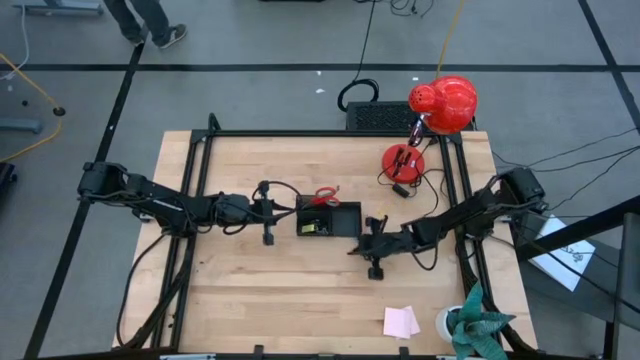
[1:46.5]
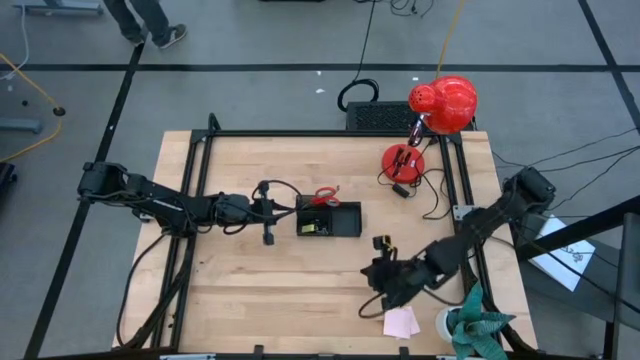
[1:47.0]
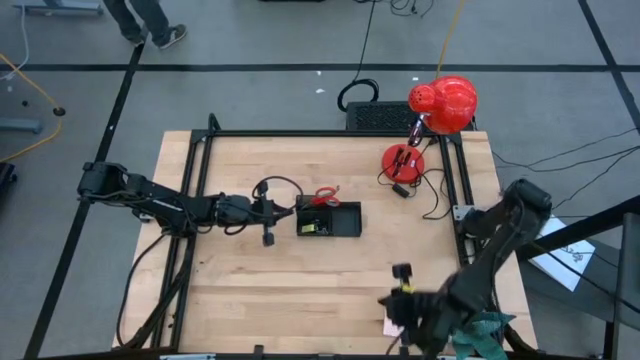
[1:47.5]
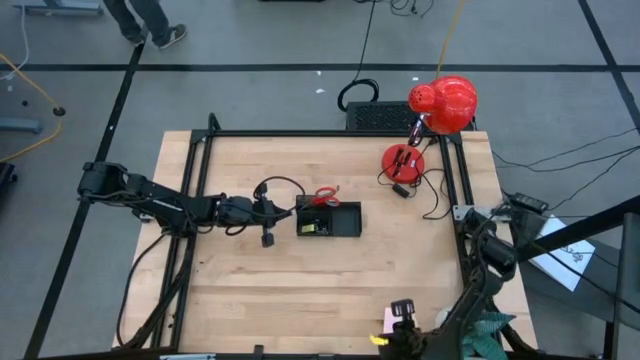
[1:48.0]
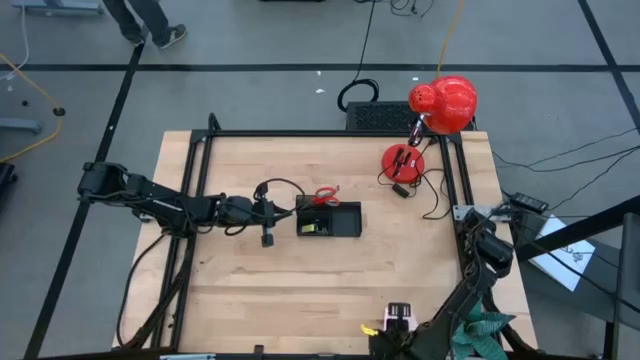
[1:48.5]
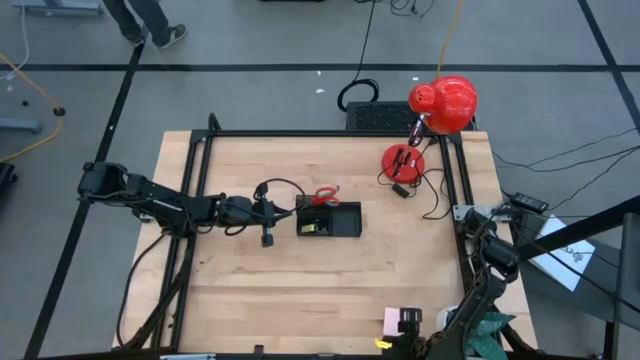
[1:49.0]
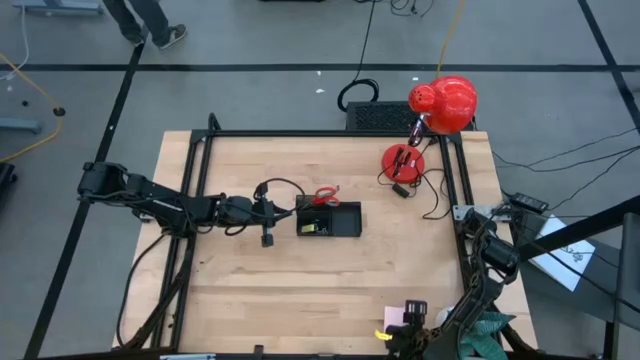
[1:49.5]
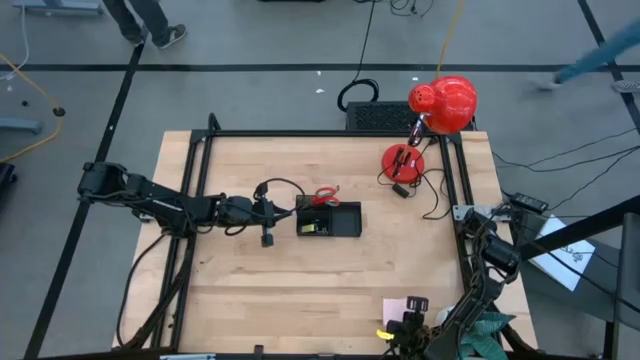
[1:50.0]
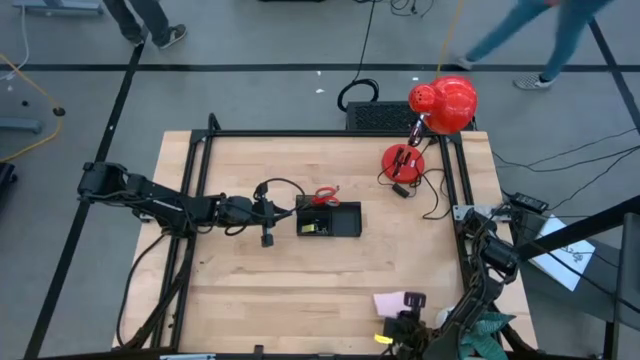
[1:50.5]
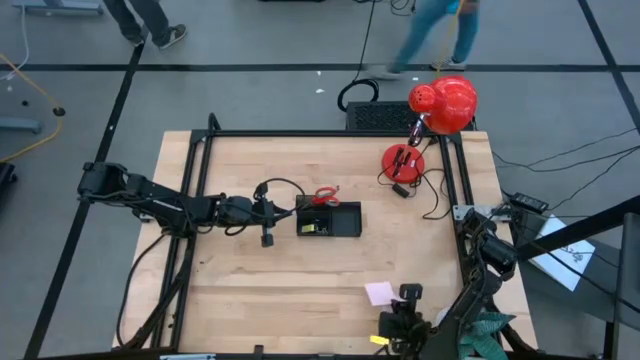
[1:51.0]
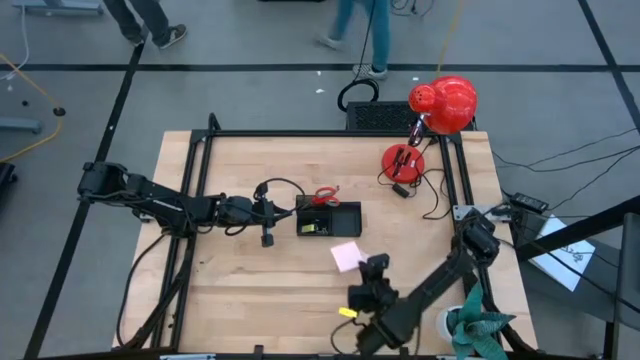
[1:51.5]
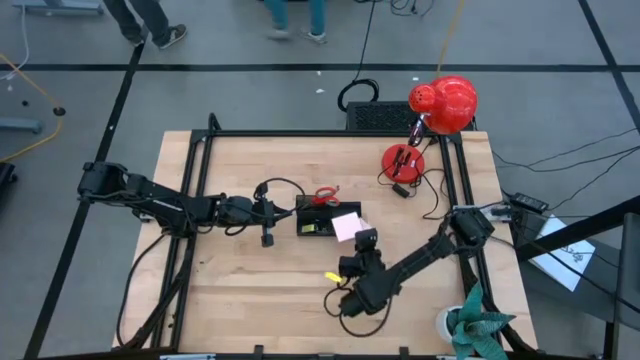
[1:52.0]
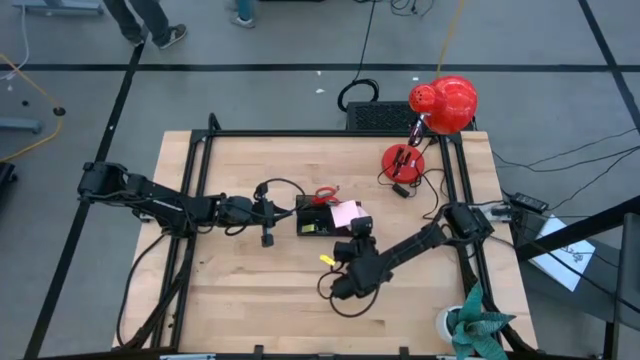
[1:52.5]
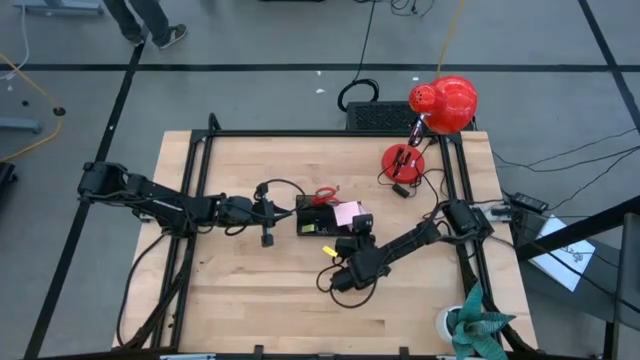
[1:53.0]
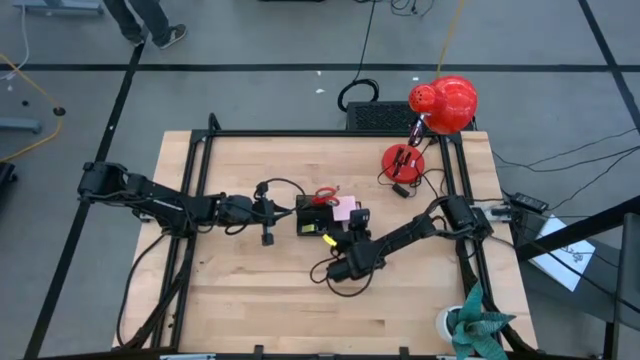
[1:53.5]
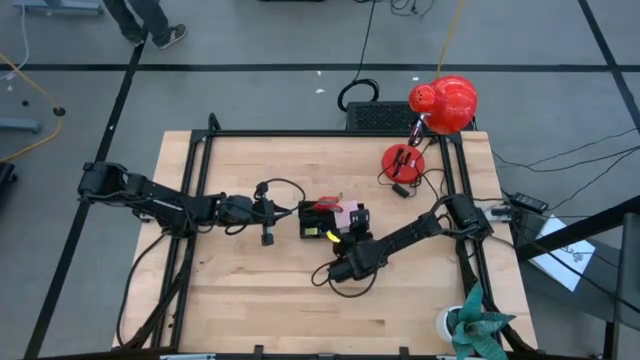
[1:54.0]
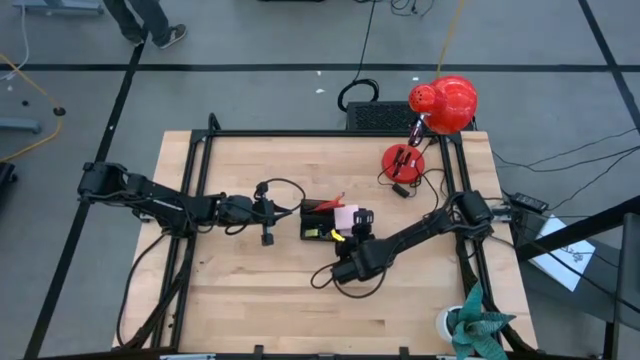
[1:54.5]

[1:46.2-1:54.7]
Task: Pick and place office supplies into organizer
Put the sticky notes into the desk organizer

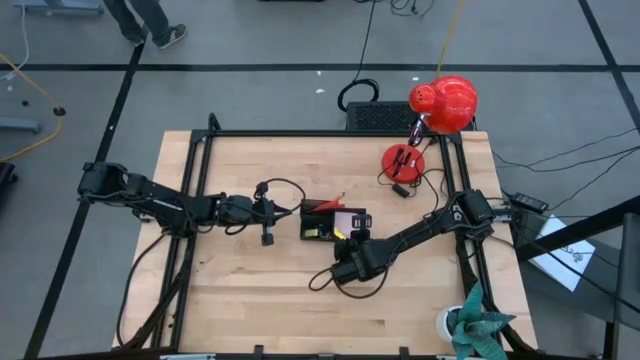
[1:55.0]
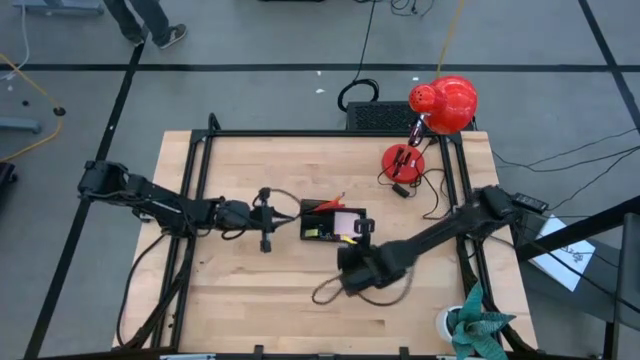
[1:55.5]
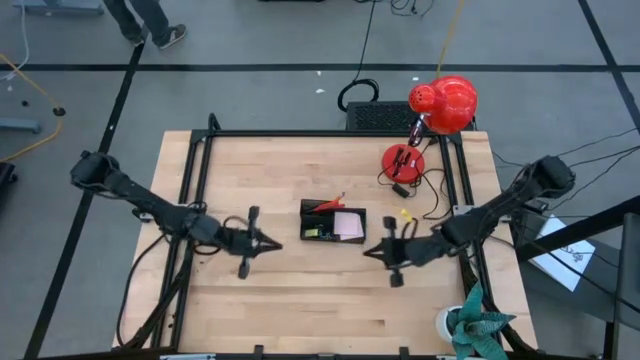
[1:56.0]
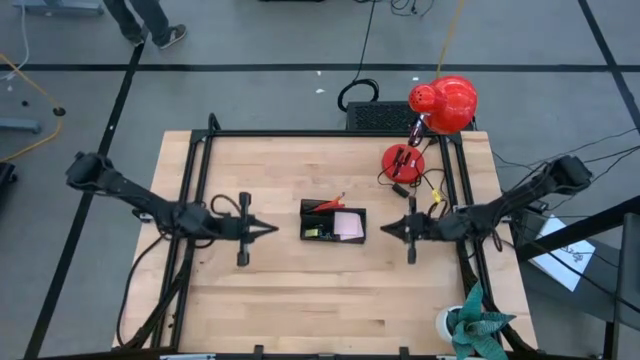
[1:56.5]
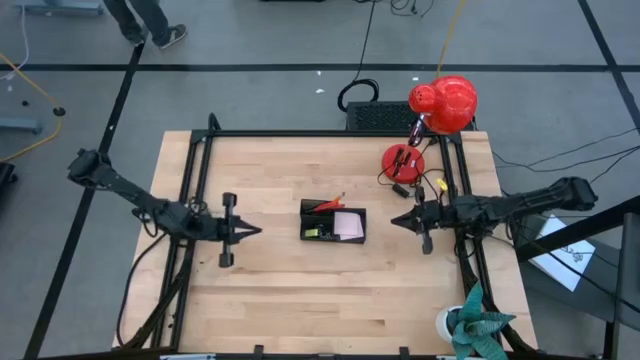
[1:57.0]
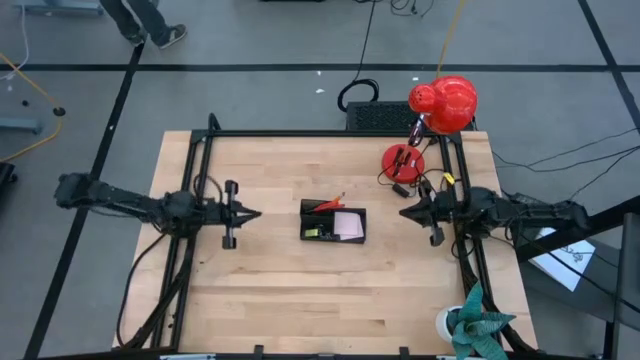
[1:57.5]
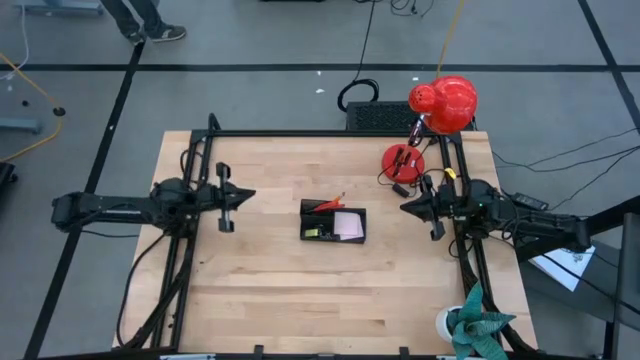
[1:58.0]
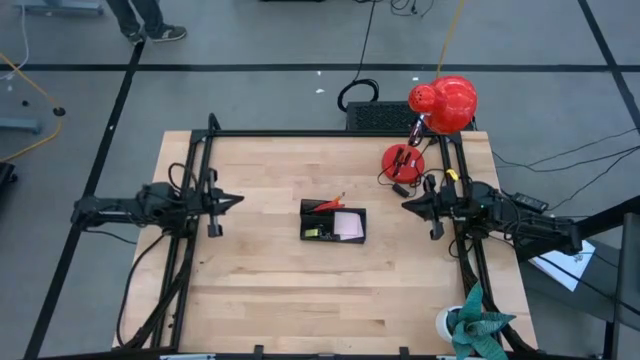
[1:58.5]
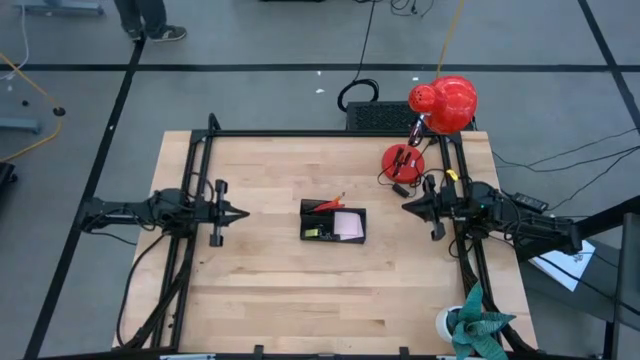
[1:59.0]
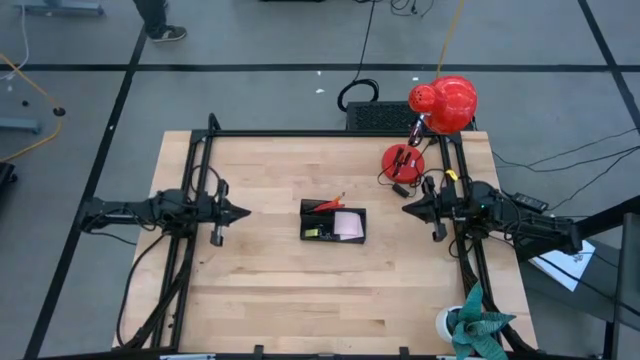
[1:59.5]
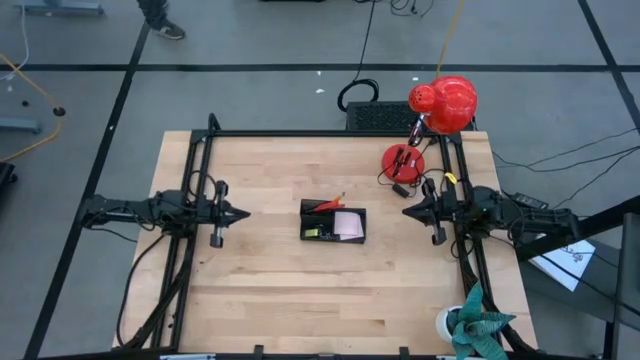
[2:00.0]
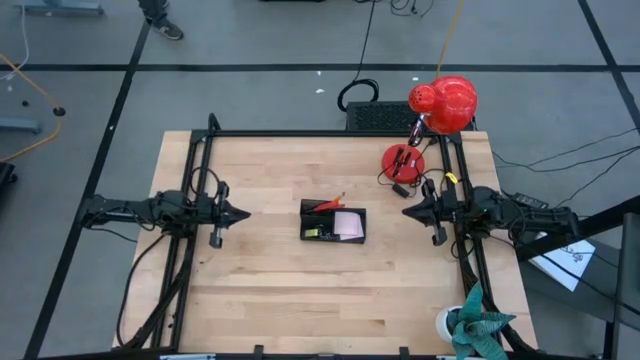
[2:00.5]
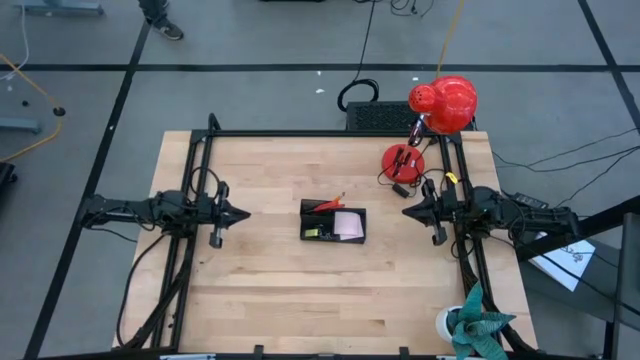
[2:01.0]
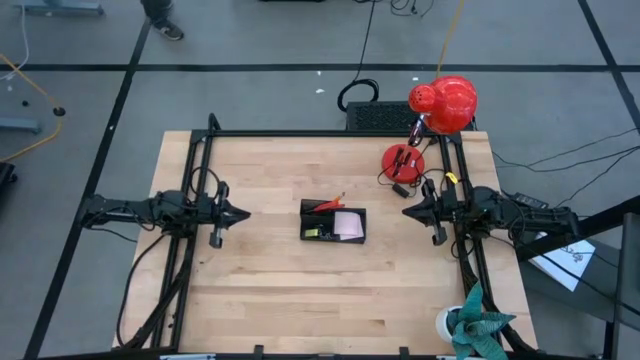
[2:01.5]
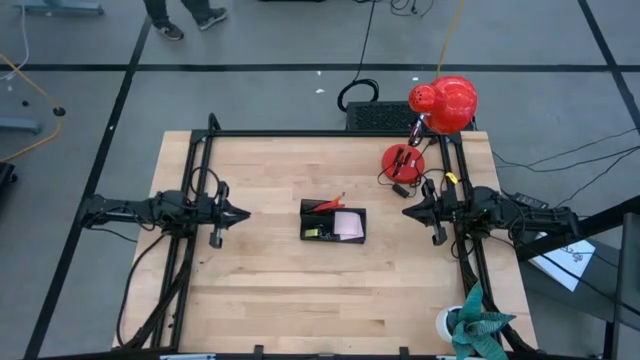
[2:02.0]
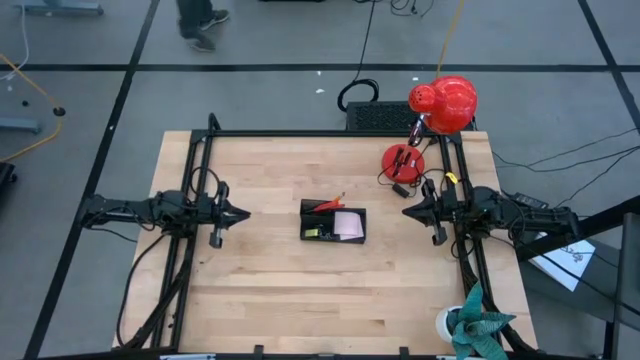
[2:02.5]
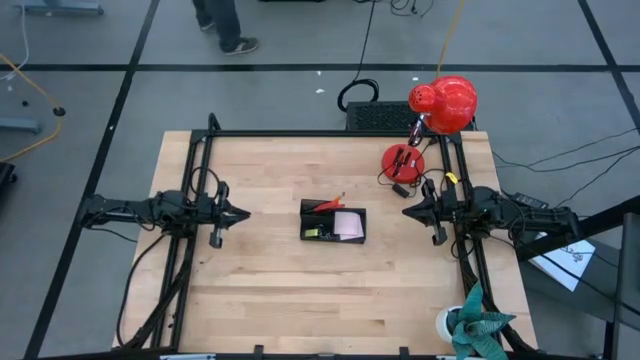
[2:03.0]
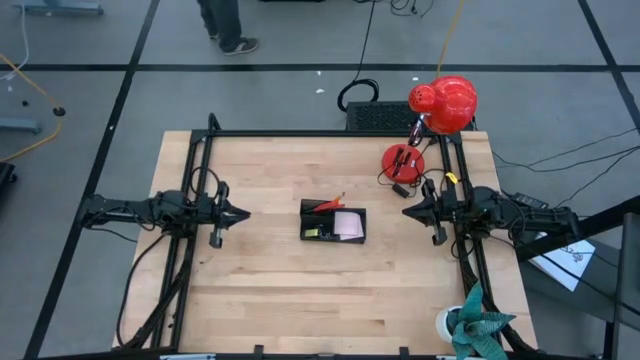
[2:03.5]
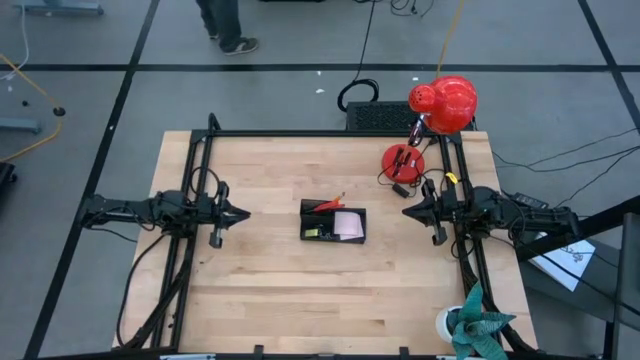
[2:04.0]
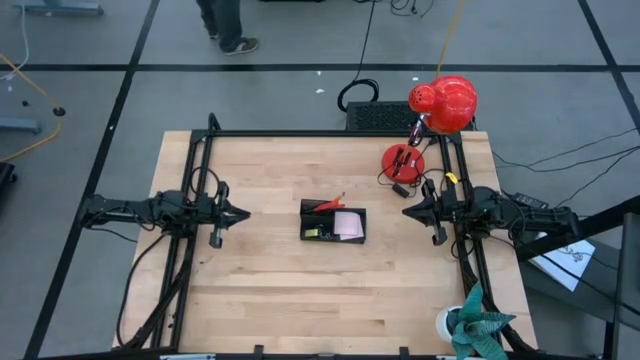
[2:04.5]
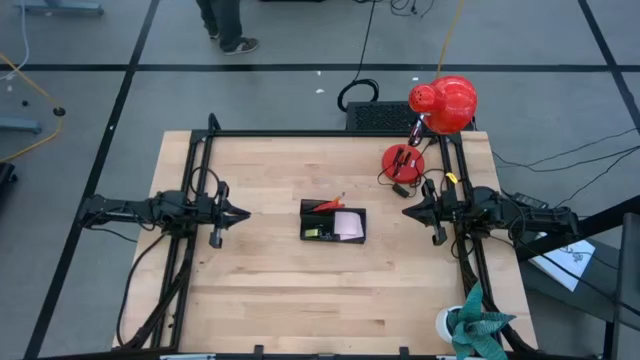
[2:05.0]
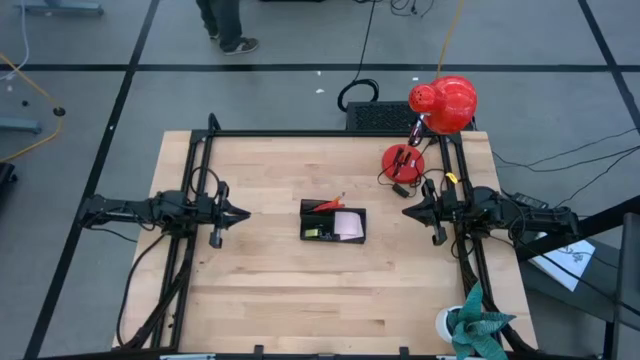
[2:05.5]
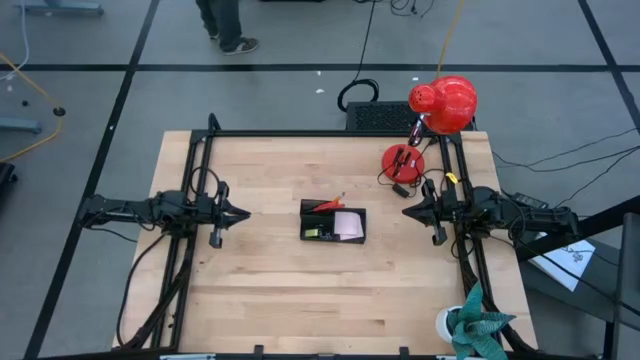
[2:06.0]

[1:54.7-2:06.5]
Return to Home Position
